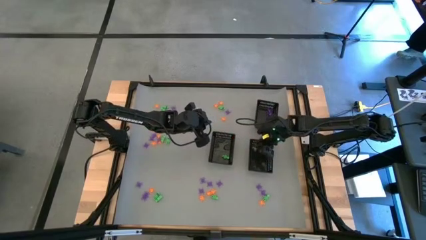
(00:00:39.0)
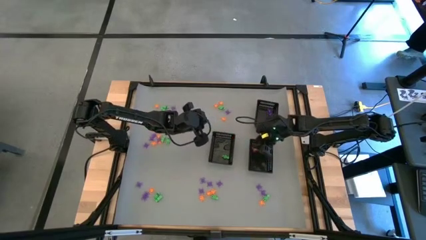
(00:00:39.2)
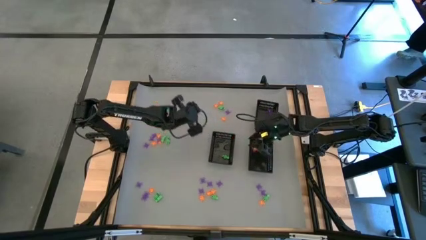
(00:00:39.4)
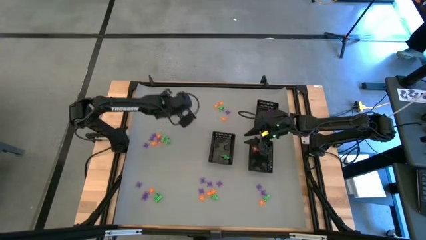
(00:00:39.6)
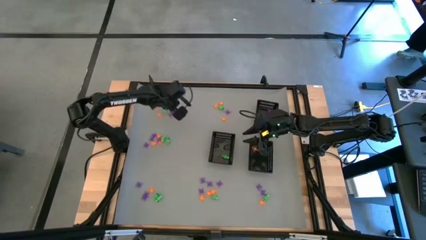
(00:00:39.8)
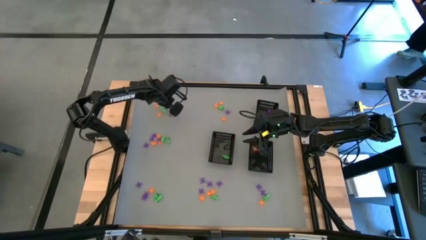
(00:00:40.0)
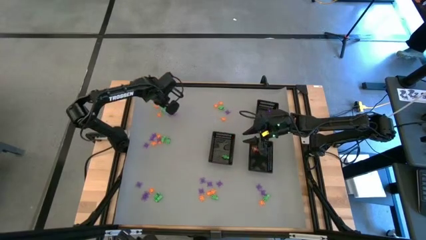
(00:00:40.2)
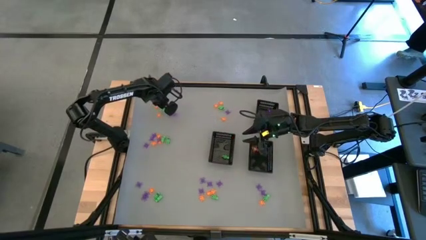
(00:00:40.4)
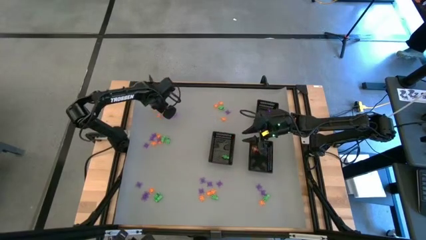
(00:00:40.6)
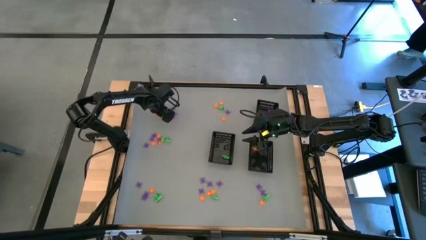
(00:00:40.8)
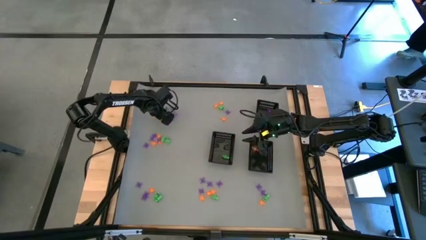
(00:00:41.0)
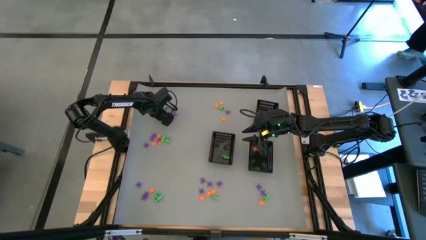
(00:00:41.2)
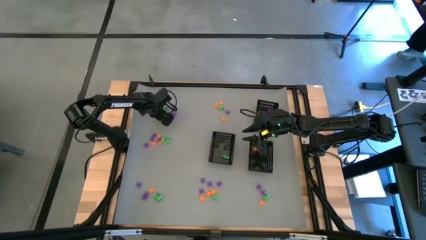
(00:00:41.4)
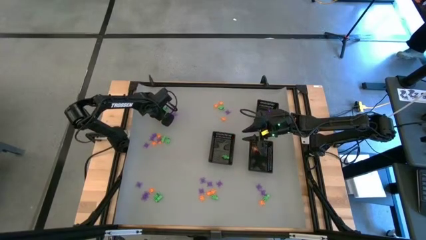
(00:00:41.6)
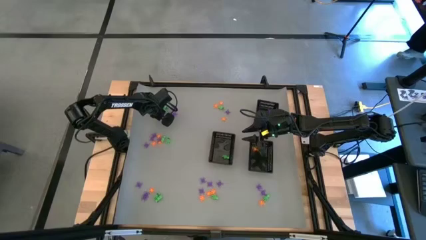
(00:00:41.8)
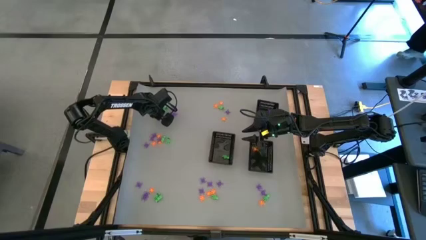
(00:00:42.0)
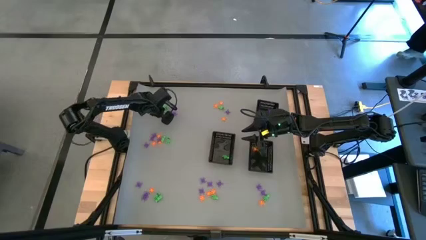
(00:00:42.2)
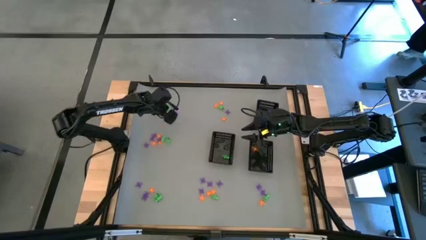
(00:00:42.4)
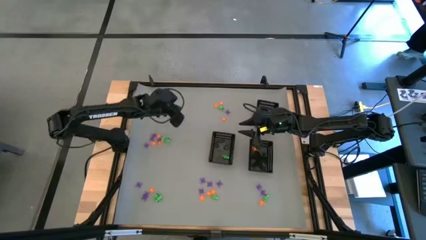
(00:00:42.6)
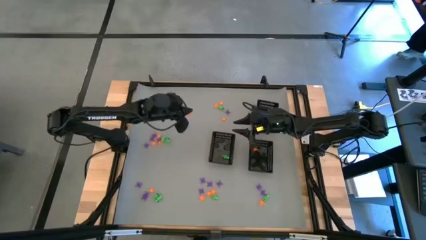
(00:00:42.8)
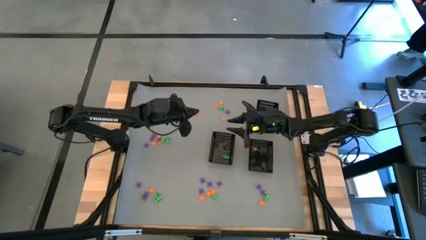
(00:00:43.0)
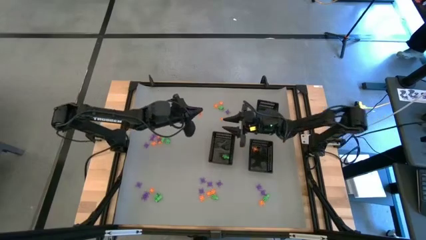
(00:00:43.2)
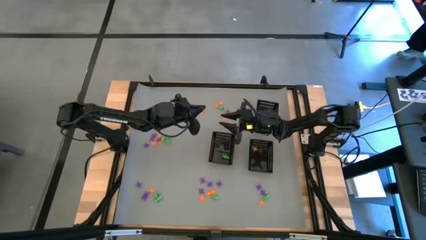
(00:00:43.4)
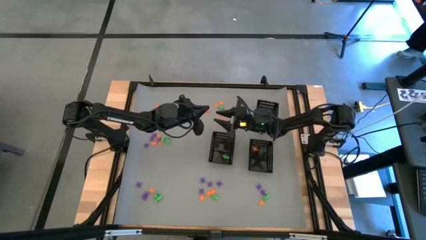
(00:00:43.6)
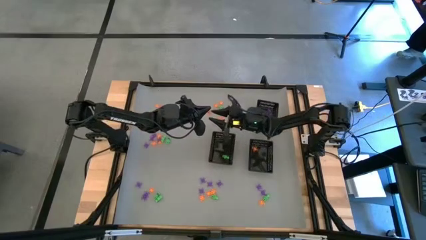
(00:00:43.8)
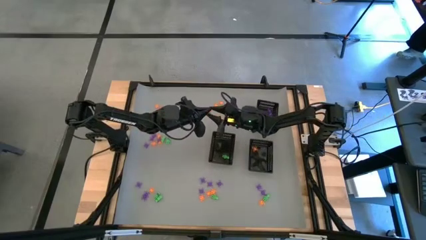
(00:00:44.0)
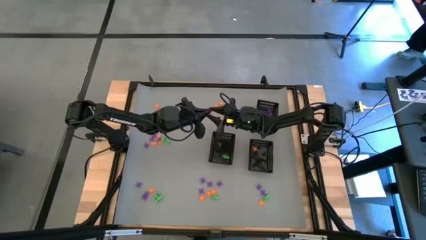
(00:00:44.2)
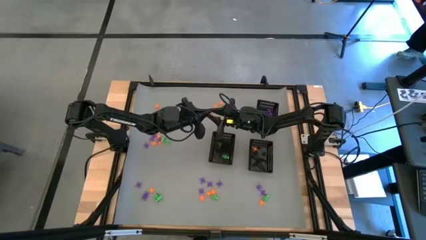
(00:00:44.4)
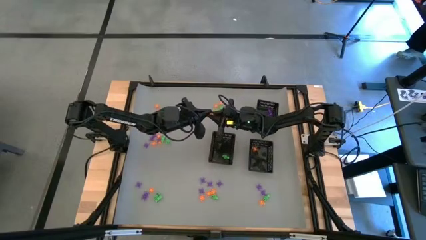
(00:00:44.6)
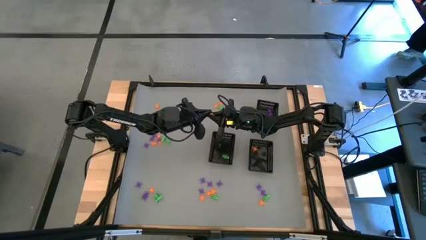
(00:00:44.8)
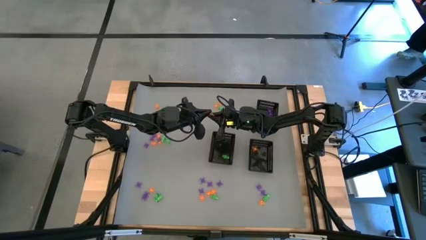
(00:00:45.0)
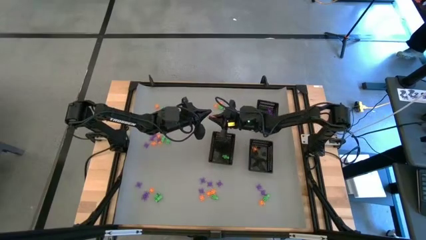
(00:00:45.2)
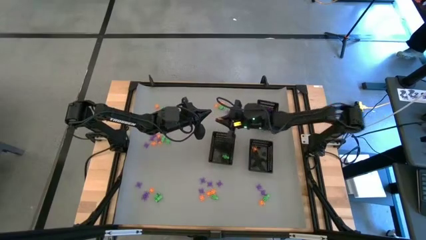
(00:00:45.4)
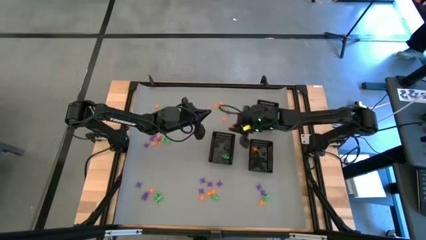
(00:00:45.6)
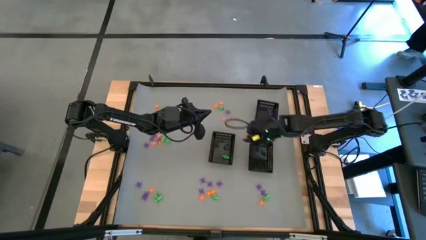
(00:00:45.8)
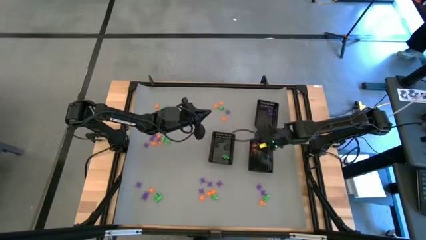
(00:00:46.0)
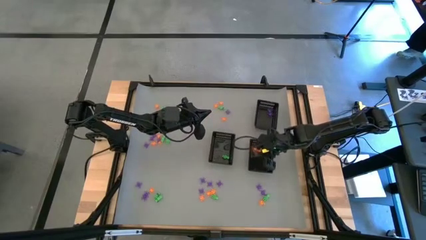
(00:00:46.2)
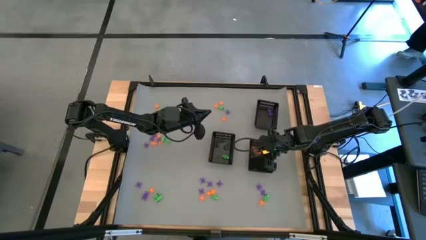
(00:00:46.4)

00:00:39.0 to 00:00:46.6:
Task: Sort Halloween decoration
Put the orange spider toy into the bottom right bin

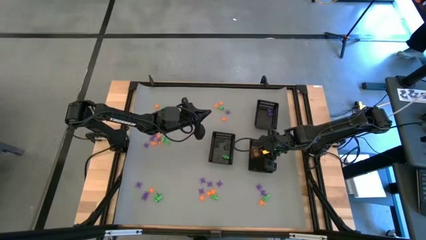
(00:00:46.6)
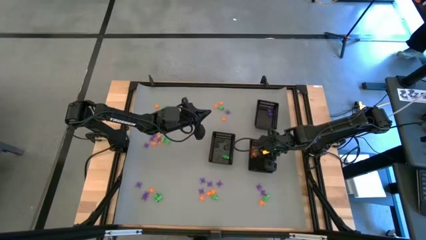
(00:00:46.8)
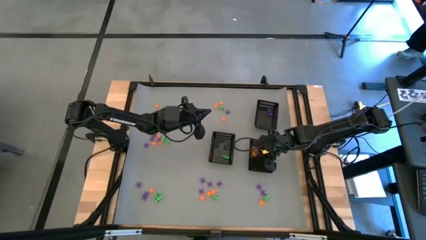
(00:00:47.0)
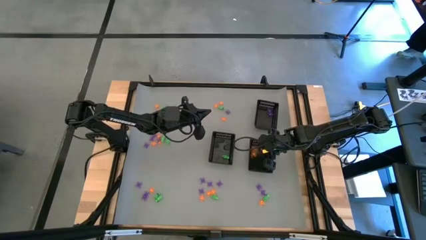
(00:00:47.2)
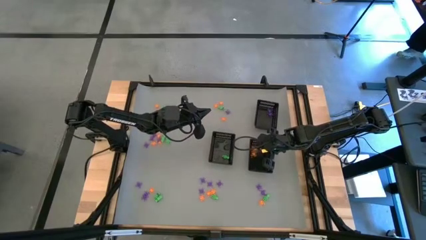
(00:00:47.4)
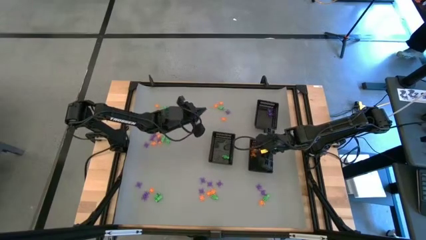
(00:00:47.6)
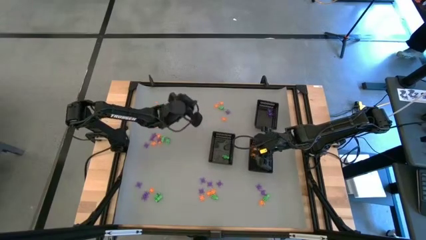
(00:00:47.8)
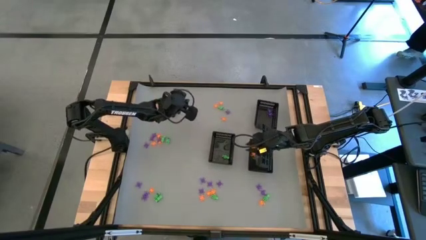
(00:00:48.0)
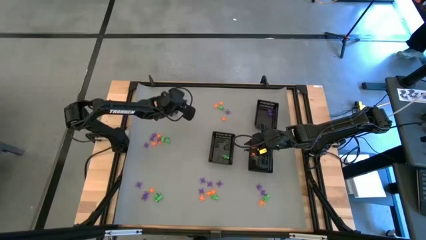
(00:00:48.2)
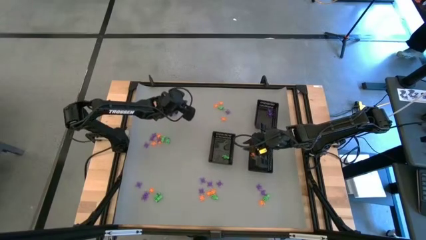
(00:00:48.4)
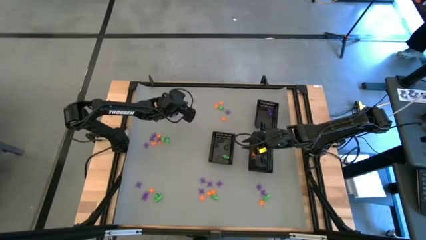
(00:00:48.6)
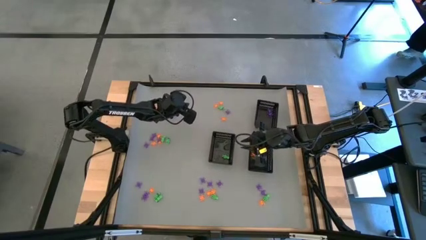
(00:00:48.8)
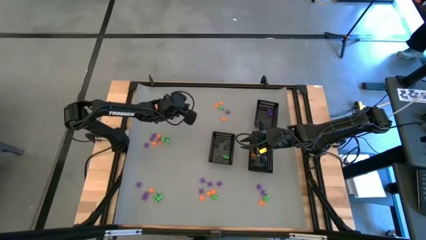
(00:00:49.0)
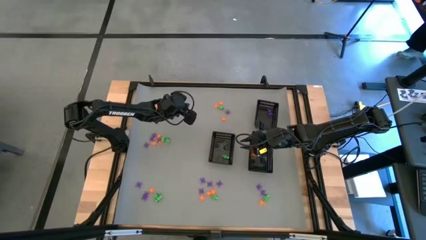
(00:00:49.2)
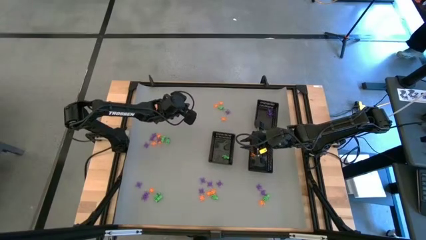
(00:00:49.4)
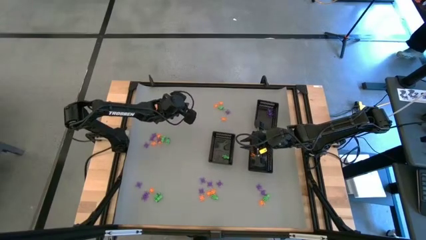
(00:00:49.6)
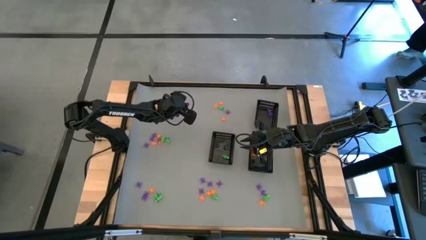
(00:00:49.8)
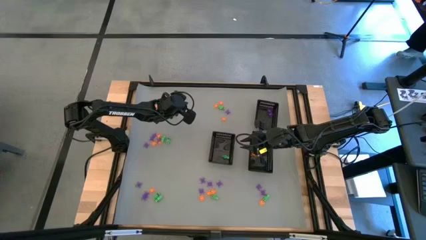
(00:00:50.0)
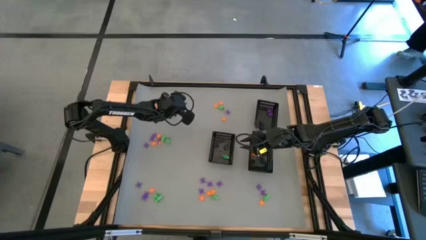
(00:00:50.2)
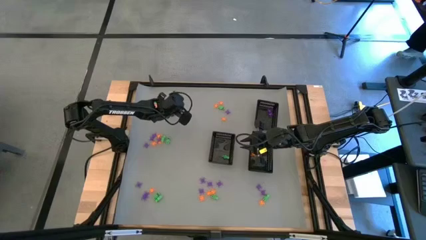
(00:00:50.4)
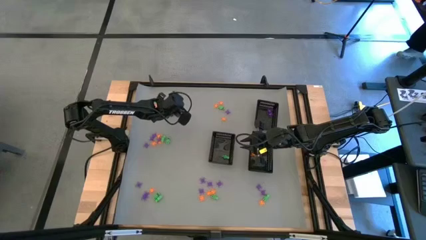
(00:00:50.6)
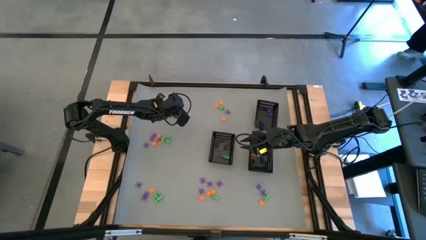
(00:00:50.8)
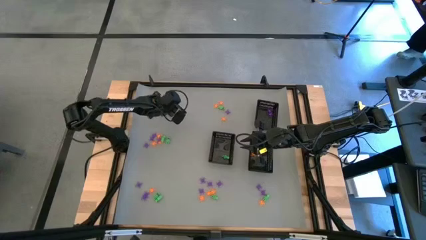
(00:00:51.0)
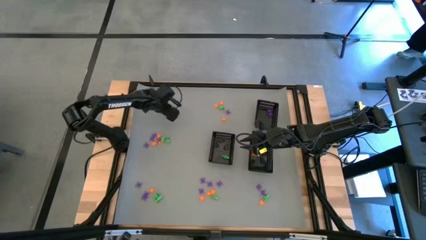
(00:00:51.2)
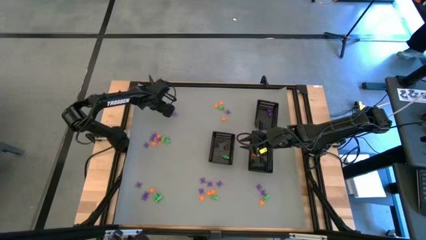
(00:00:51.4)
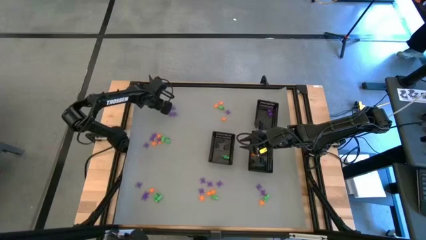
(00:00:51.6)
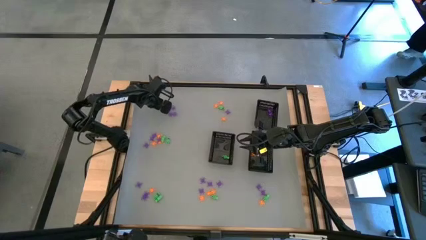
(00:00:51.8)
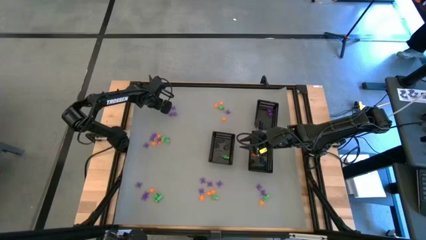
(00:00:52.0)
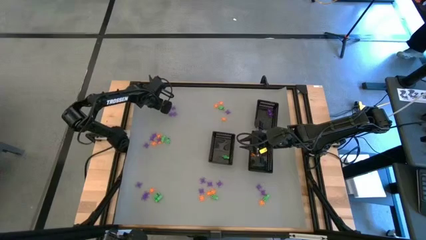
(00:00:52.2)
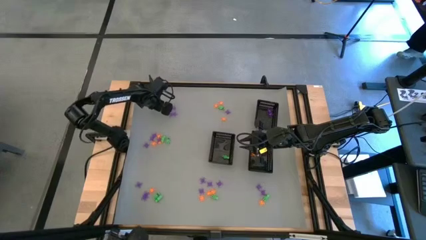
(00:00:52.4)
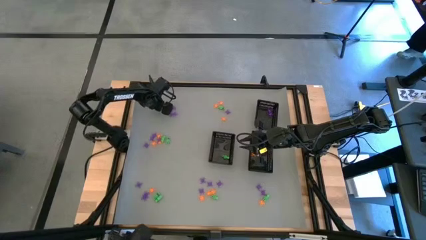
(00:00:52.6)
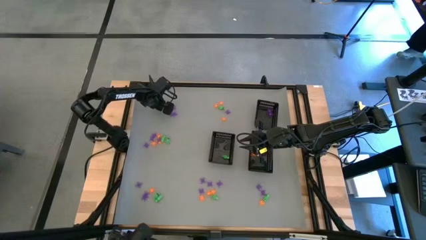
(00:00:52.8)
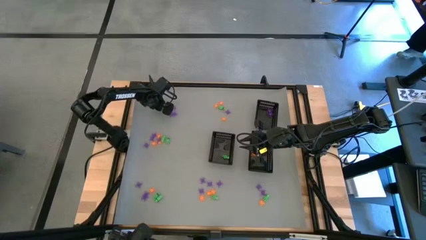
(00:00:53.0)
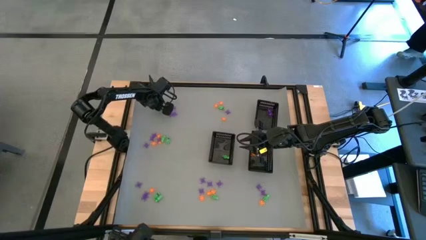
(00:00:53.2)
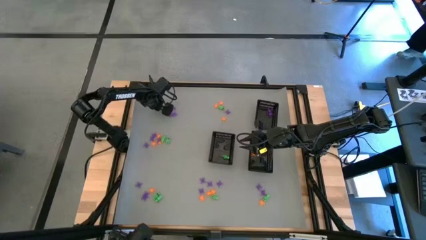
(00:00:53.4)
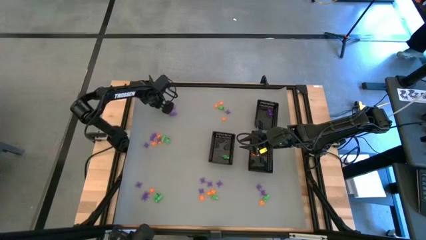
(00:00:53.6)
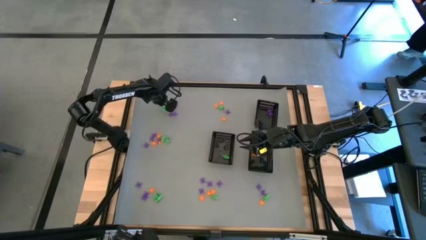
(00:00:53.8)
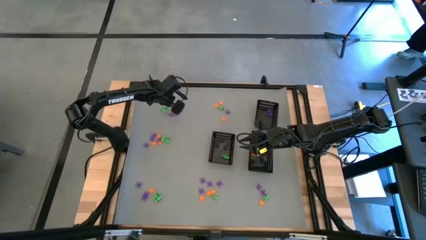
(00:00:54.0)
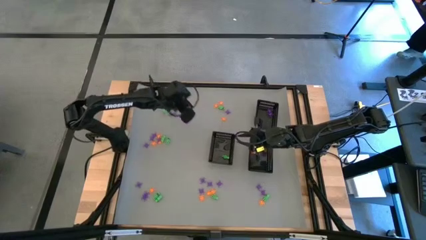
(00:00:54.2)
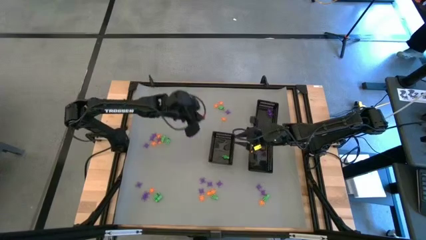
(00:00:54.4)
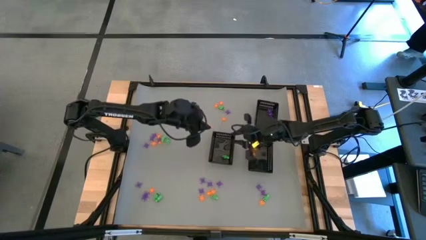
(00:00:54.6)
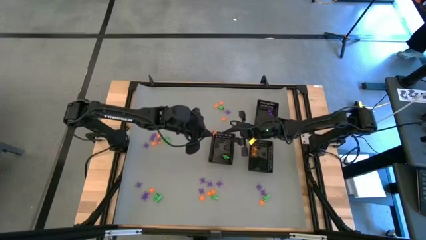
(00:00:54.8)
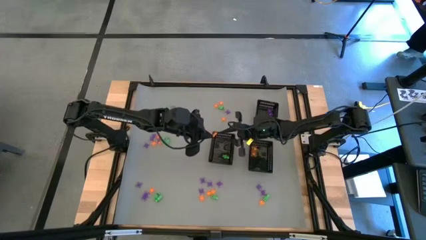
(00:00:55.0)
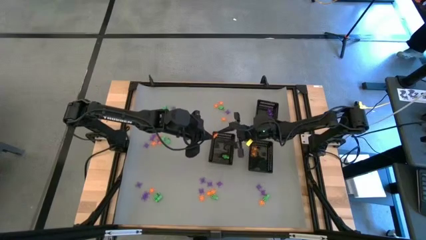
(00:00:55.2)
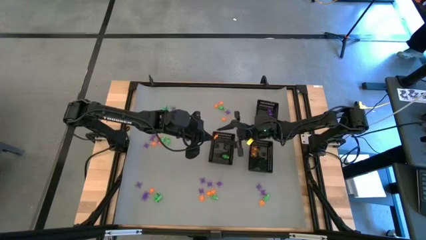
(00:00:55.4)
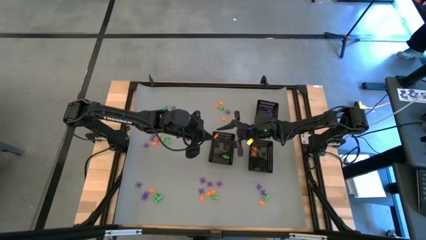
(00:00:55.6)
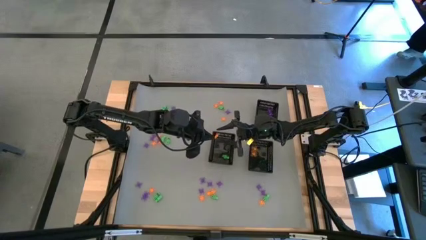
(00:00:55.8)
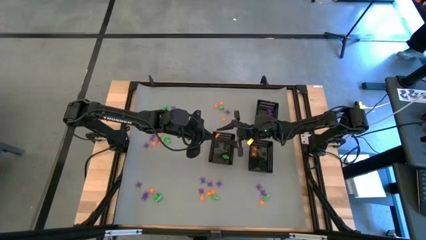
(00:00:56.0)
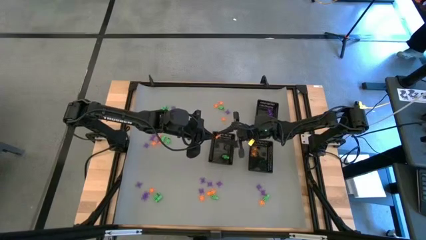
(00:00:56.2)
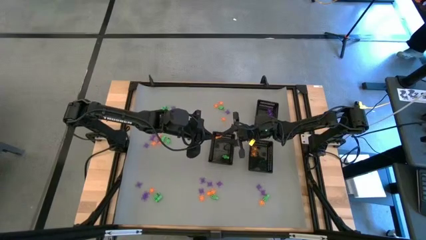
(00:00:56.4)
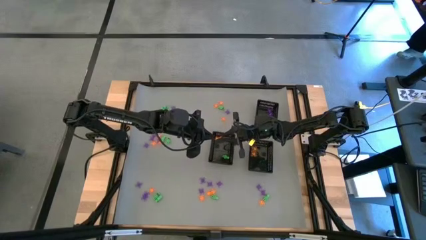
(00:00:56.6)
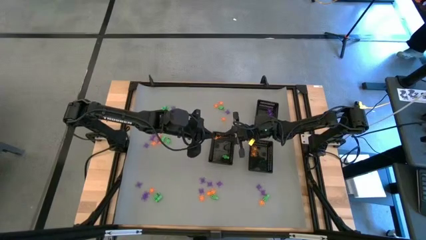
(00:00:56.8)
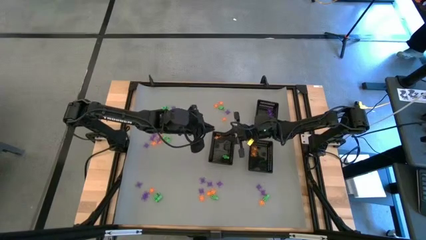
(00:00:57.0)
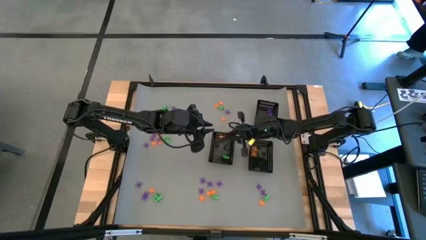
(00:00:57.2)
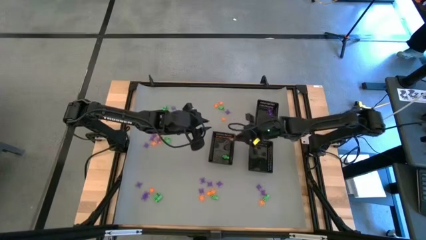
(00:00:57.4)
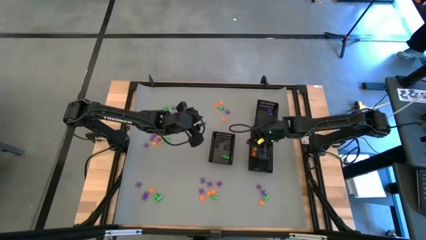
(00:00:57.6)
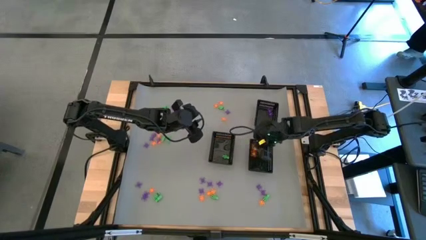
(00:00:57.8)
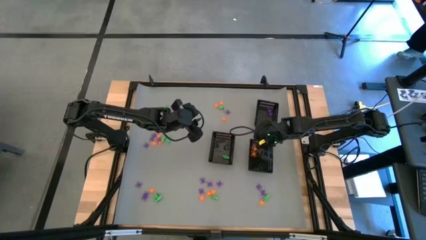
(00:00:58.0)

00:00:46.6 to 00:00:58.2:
Put the orange spider toy into the bottom right bin
